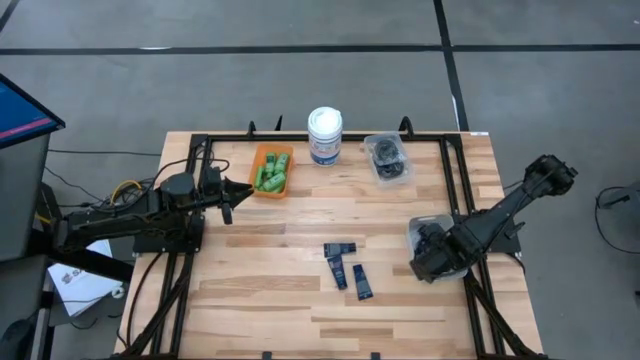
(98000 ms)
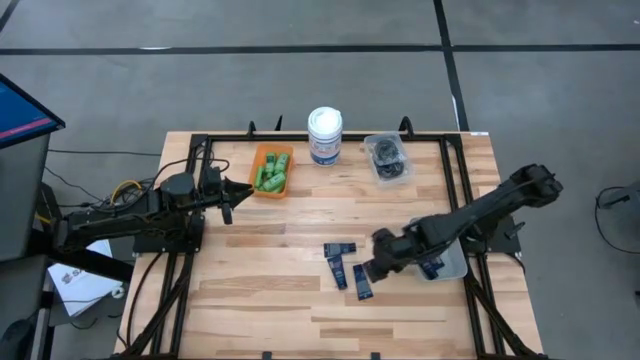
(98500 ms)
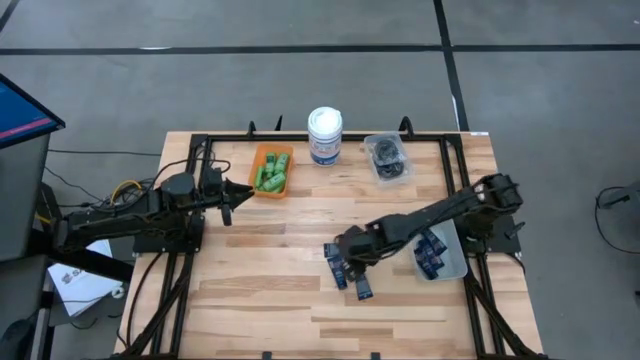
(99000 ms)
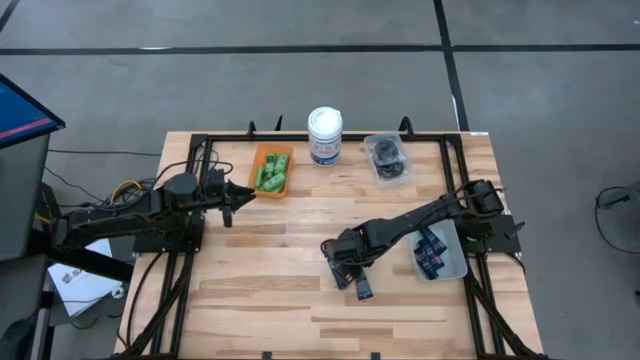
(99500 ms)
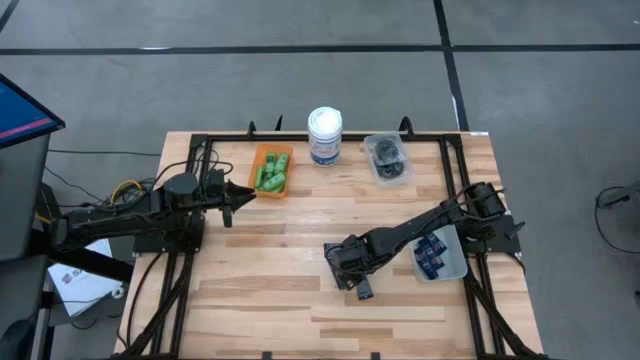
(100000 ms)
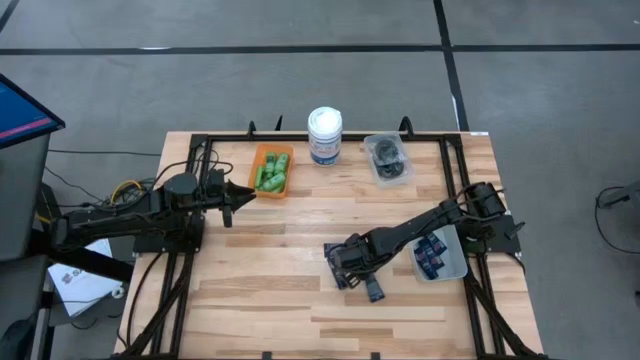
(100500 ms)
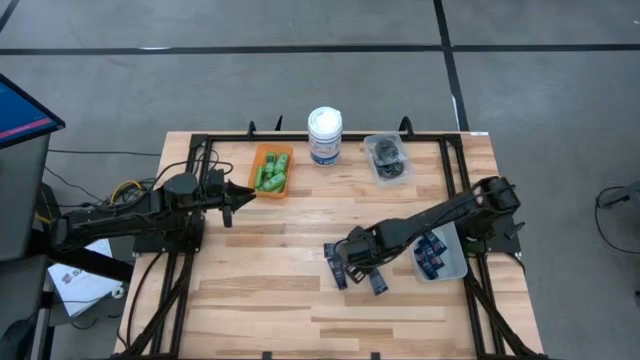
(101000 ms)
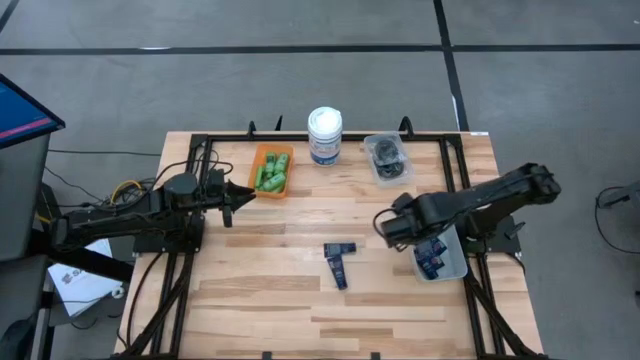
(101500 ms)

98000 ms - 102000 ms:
Task: Pick & Place Travel size toiletries
Put the blue shave cream into the gray bin

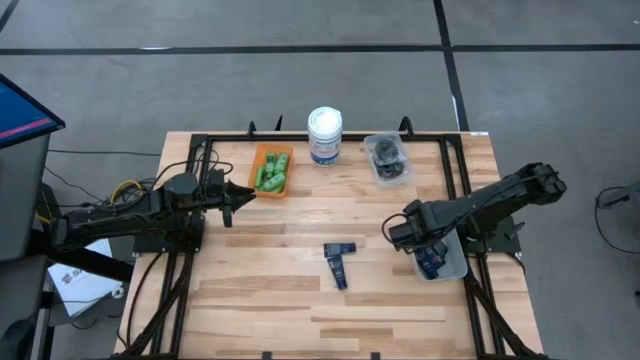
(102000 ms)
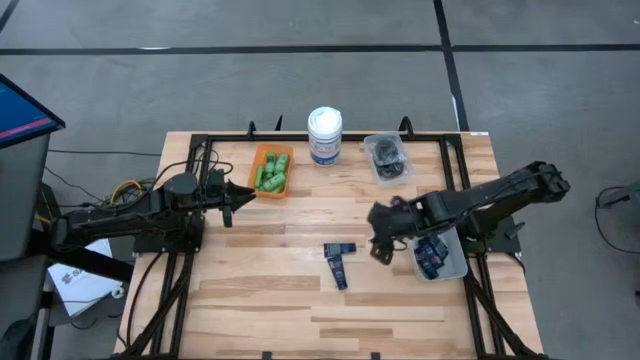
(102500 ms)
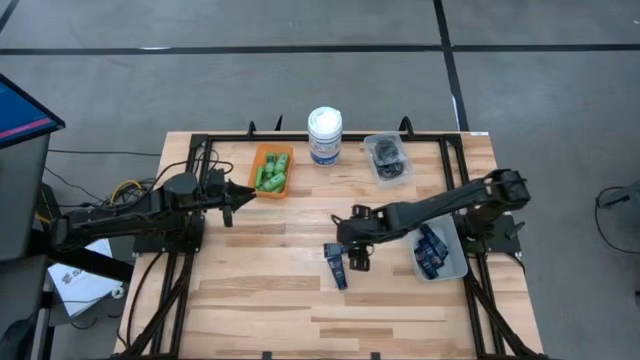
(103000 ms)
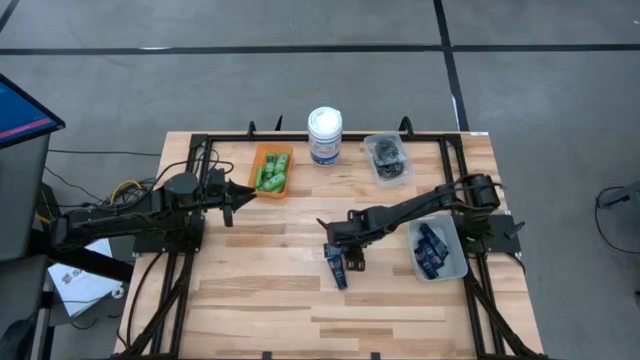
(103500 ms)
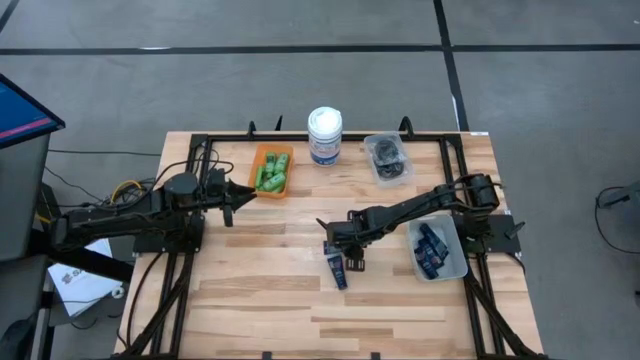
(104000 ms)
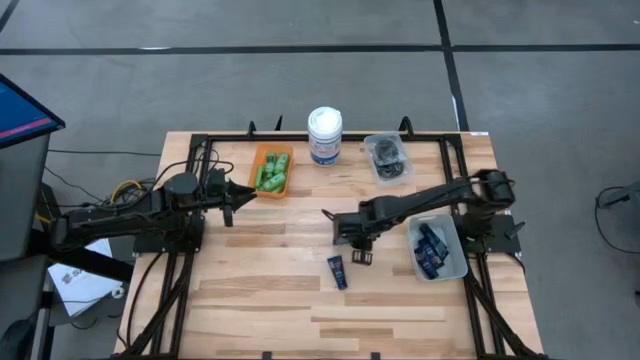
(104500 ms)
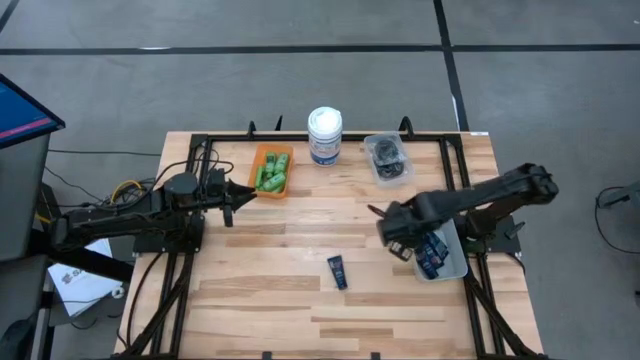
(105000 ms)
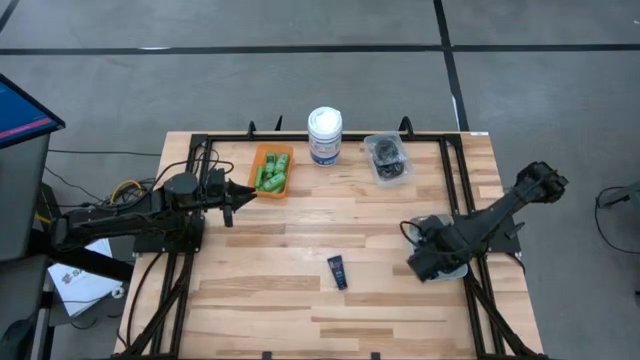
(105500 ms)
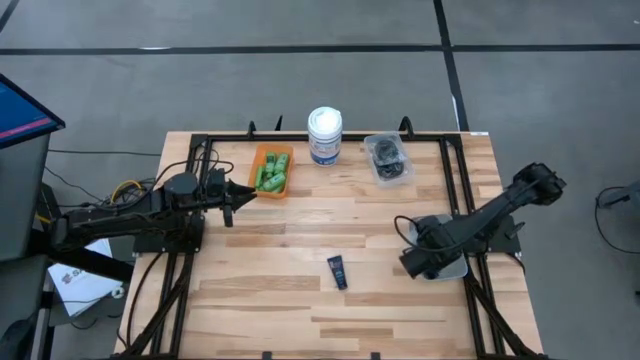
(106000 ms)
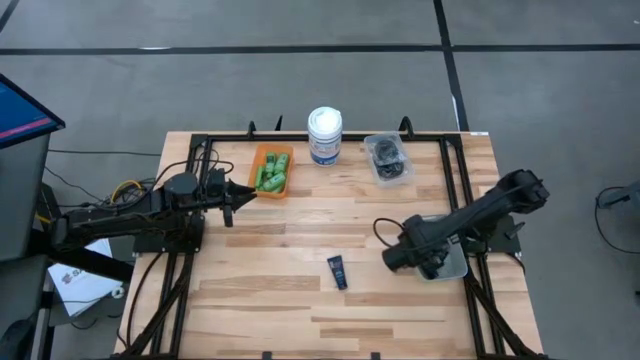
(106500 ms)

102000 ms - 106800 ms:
Put the blue shave cream into the gray bin

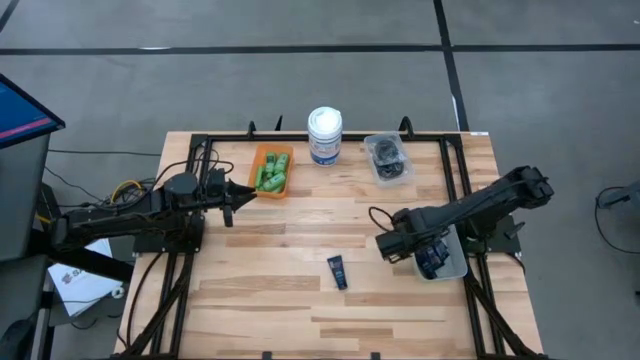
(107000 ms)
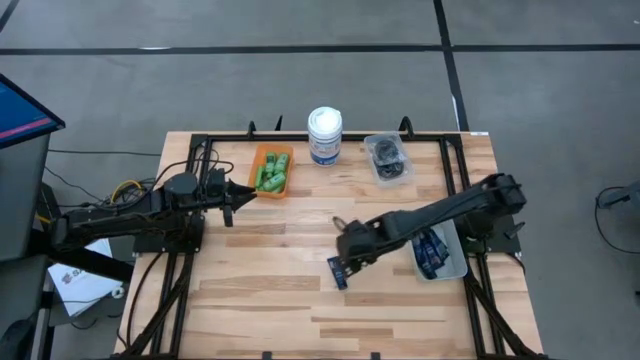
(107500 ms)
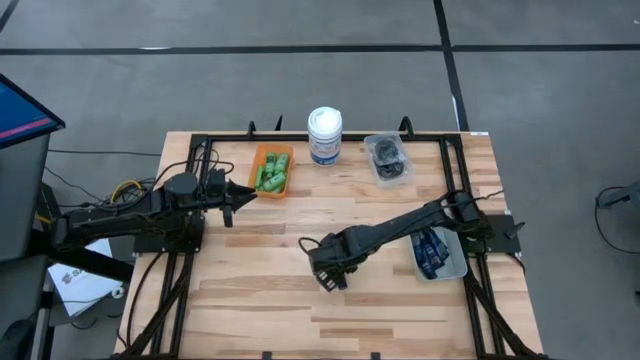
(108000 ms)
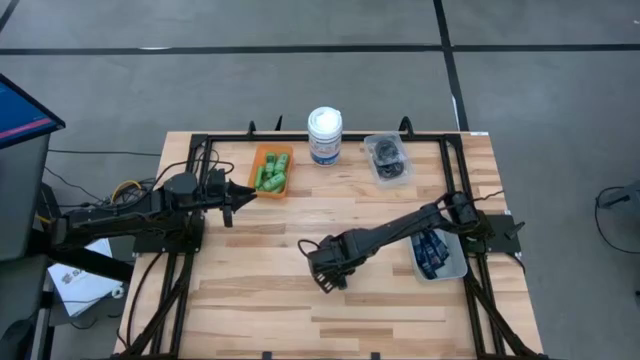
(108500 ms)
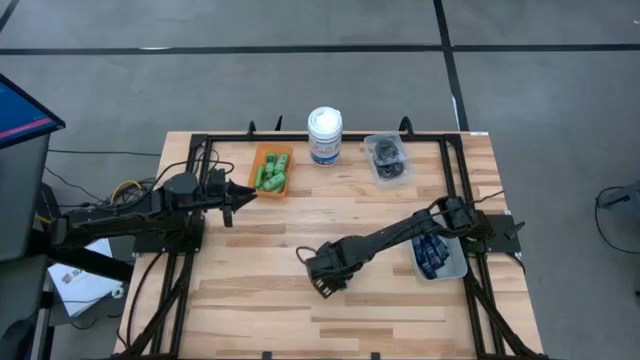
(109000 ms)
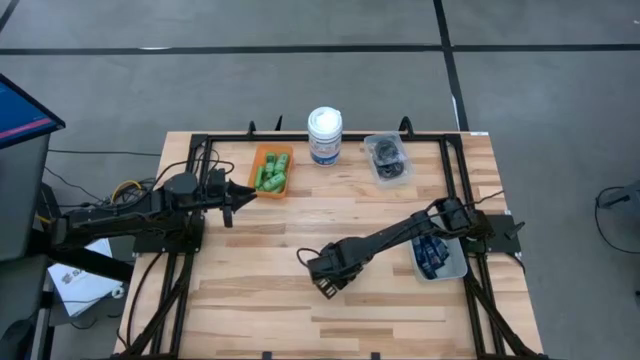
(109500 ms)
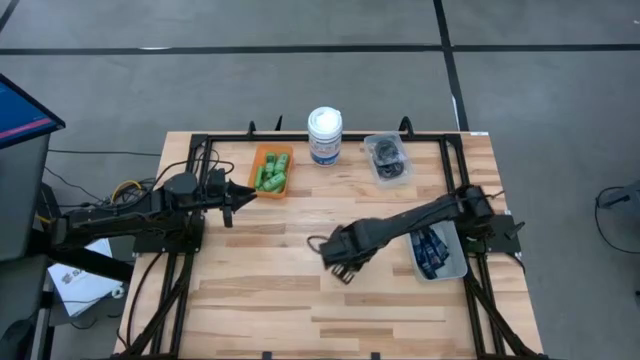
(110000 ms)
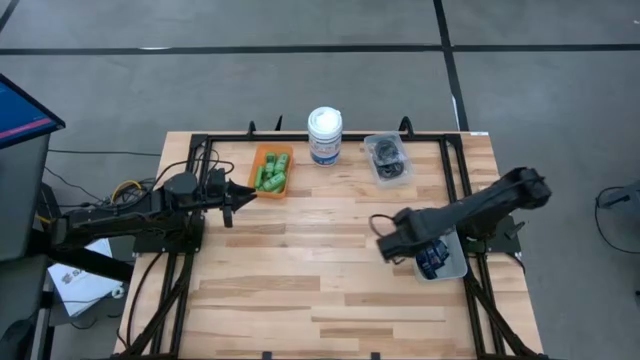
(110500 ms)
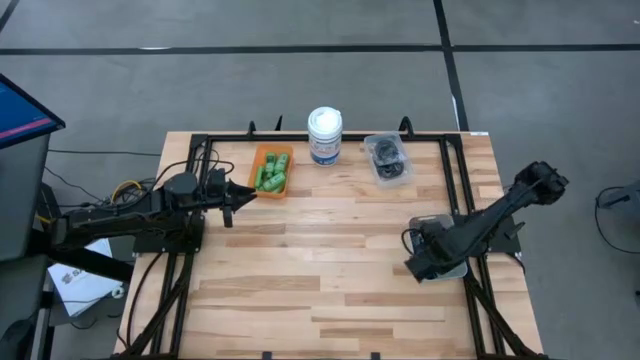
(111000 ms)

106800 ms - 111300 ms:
Put the blue shave cream into the gray bin

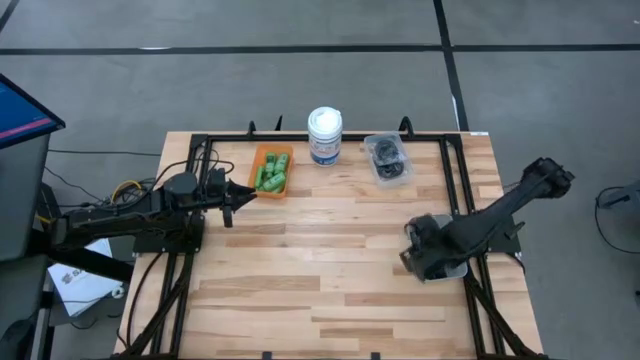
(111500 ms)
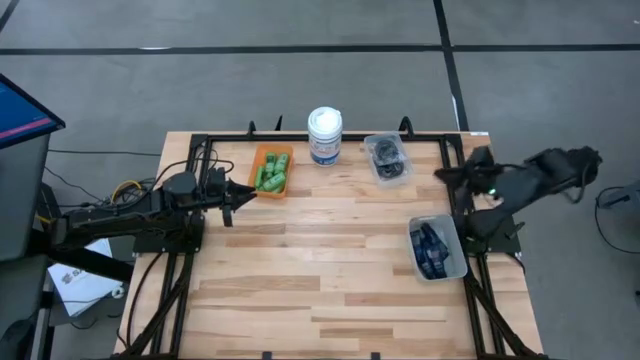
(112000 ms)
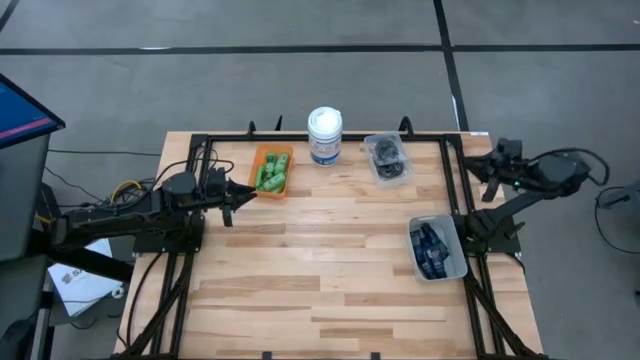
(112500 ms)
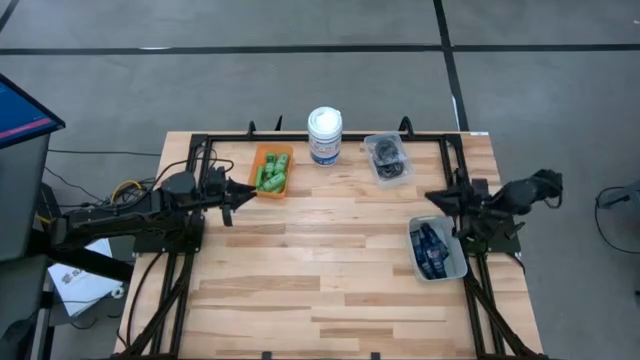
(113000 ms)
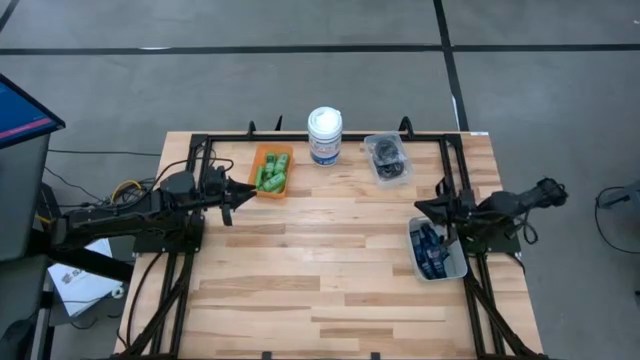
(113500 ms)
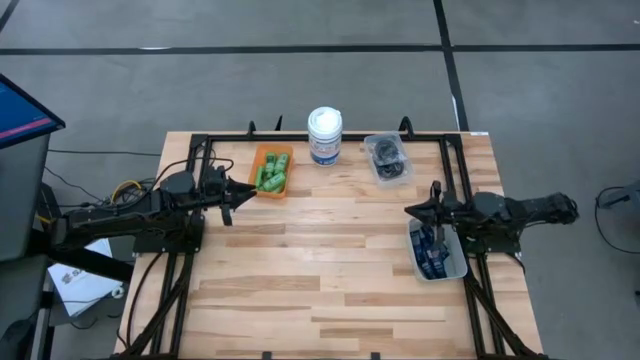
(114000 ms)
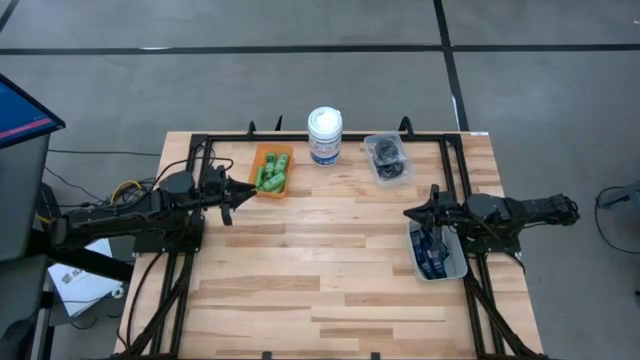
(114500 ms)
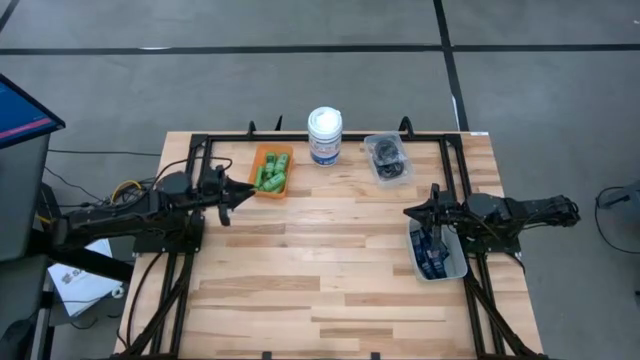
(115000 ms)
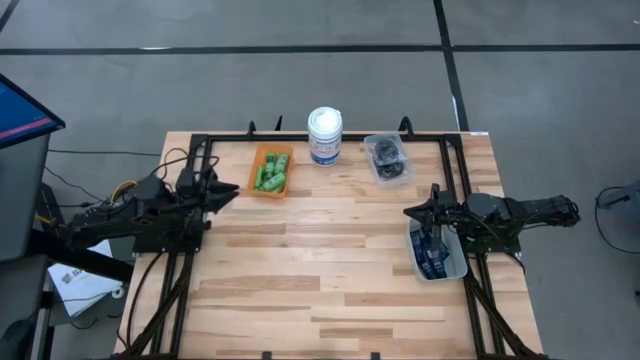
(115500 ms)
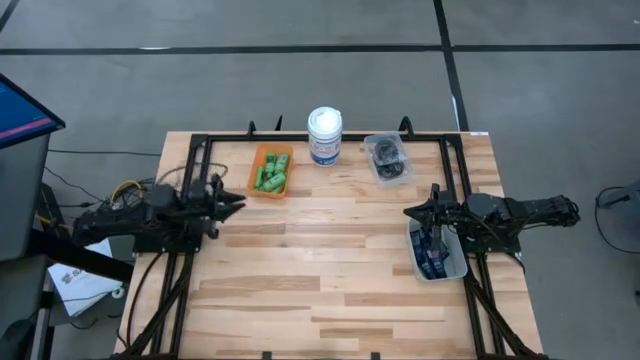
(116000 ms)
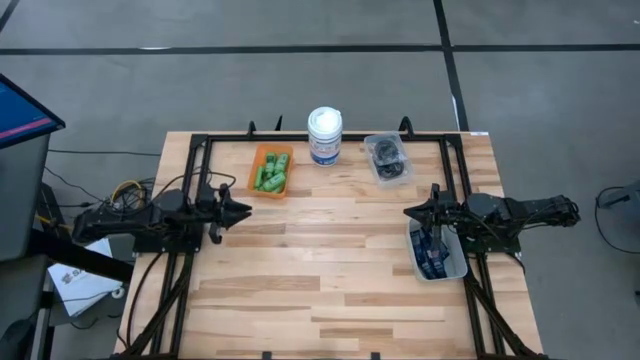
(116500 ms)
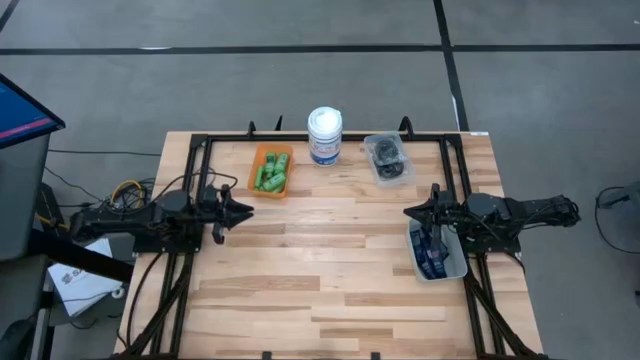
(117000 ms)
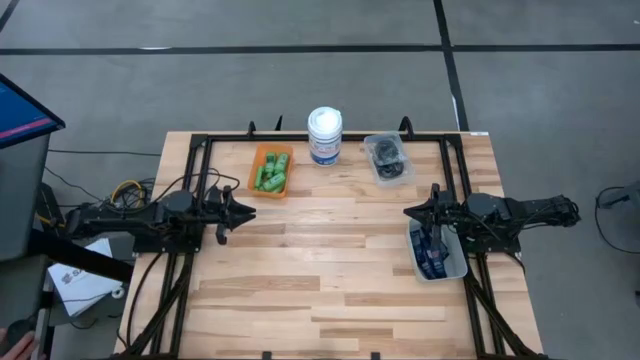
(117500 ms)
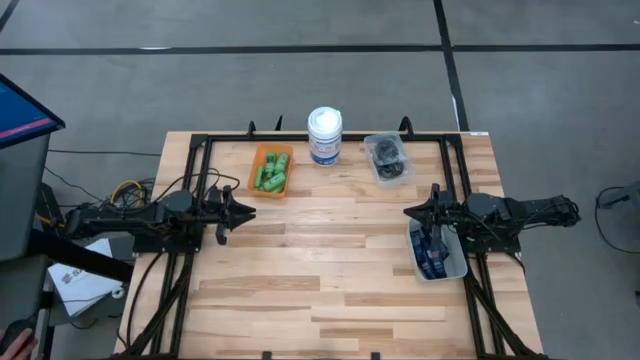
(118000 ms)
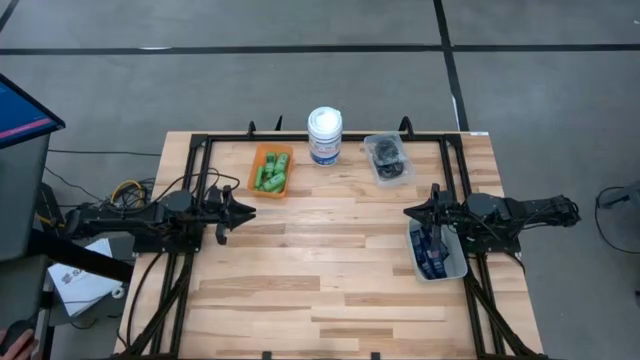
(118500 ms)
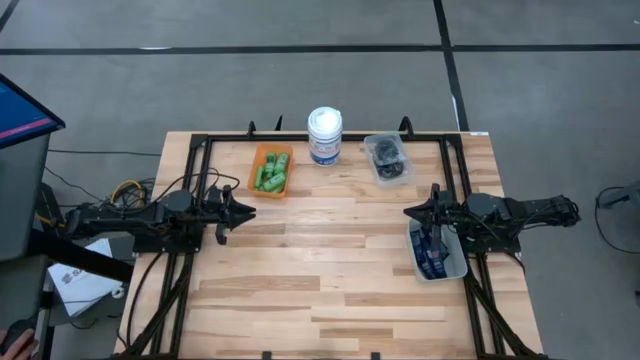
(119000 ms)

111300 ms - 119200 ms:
Return to Home Position
